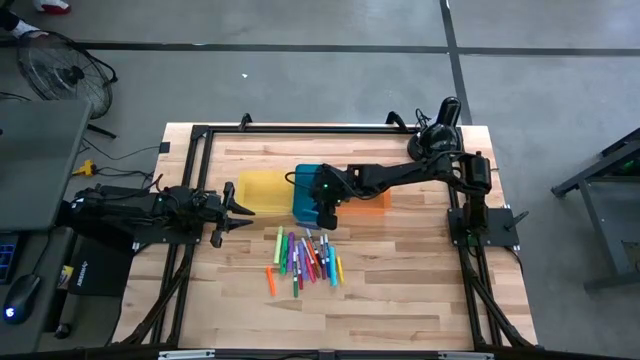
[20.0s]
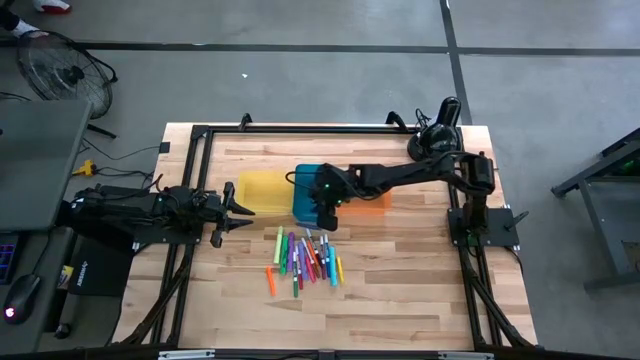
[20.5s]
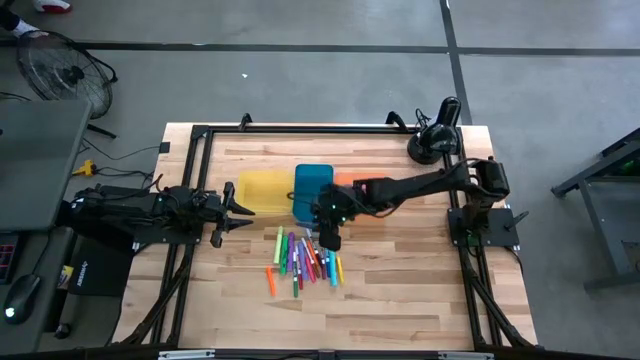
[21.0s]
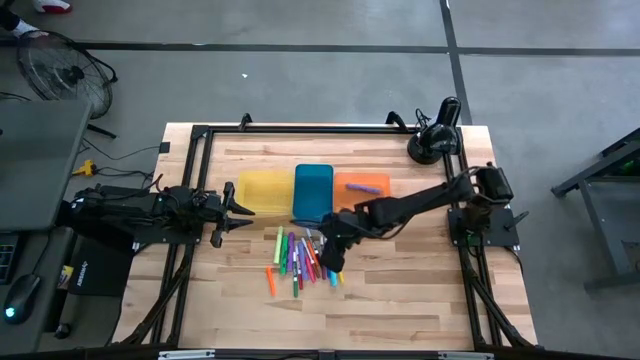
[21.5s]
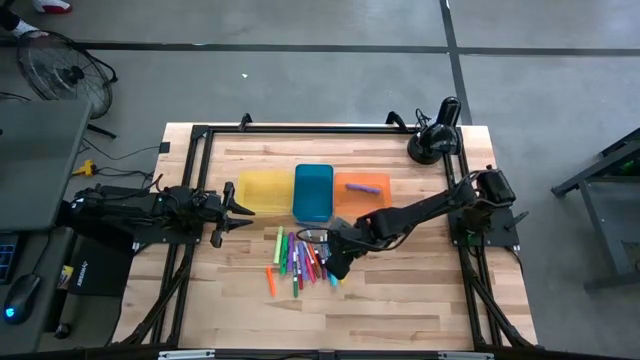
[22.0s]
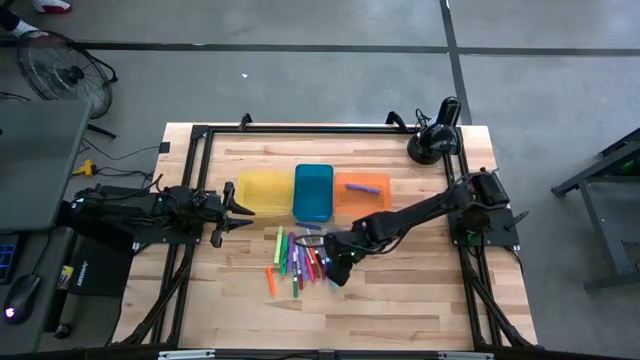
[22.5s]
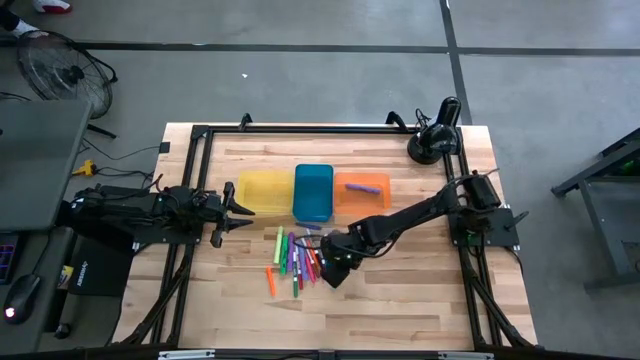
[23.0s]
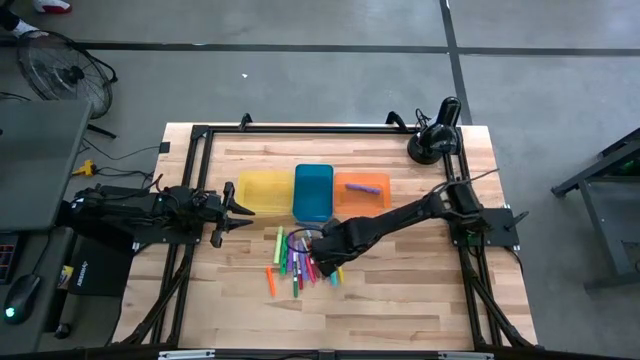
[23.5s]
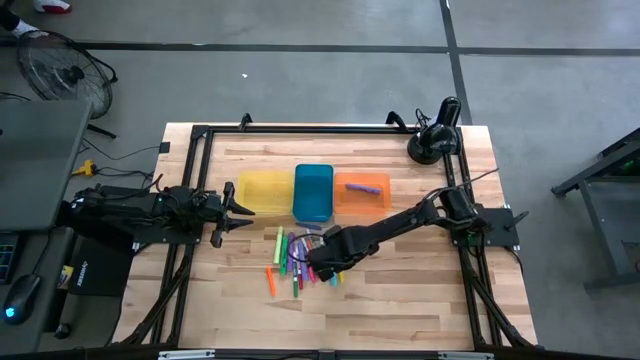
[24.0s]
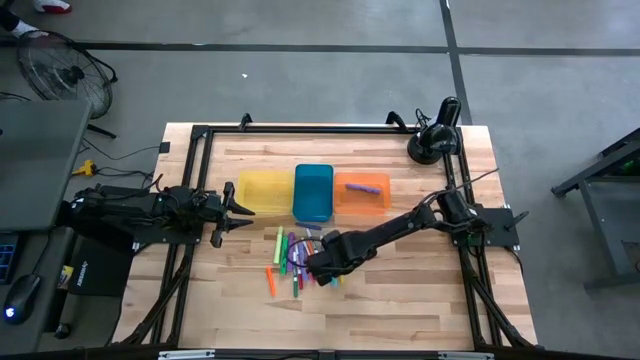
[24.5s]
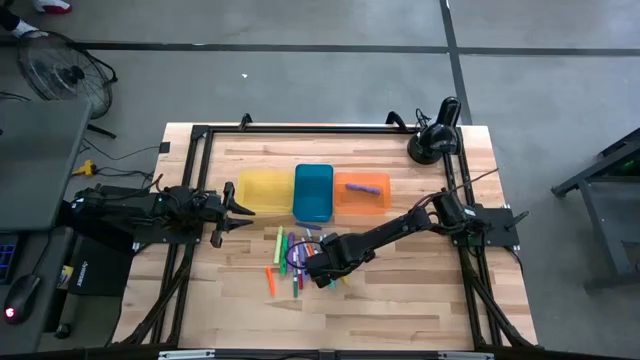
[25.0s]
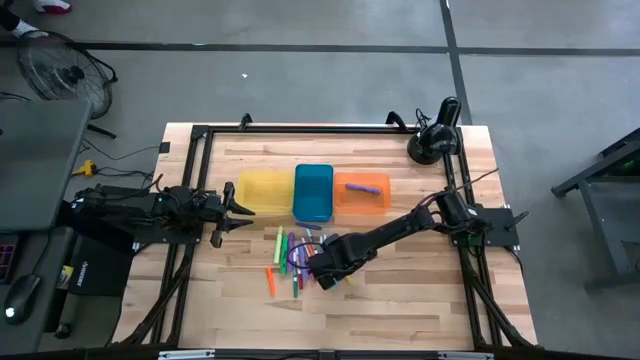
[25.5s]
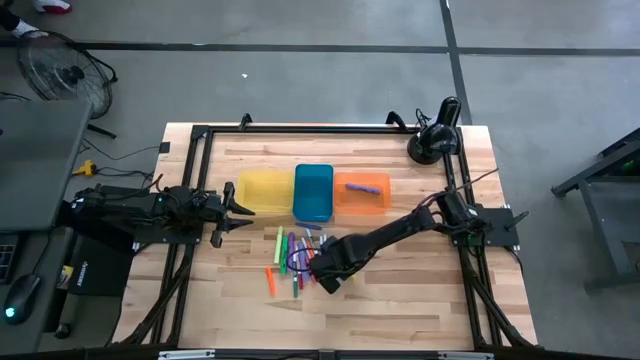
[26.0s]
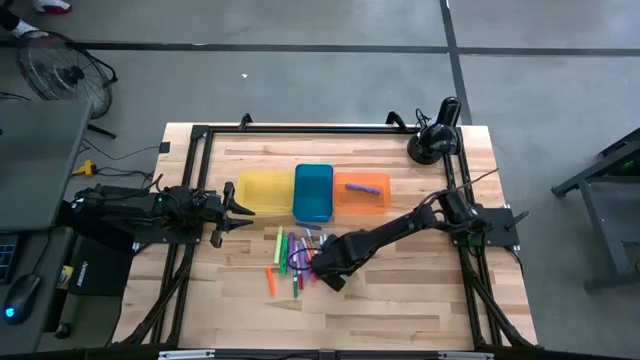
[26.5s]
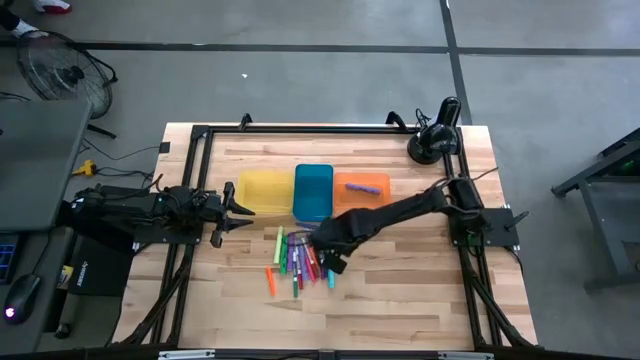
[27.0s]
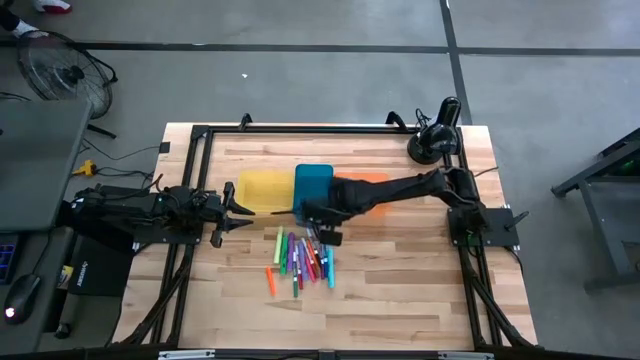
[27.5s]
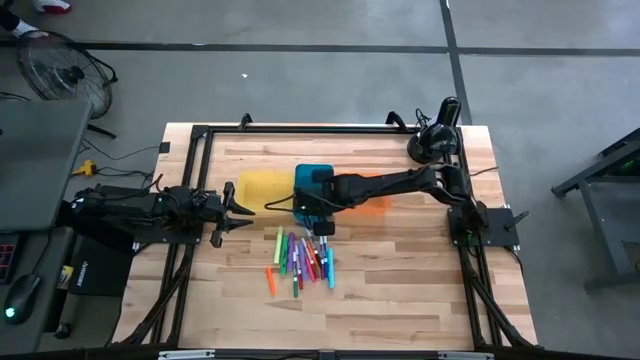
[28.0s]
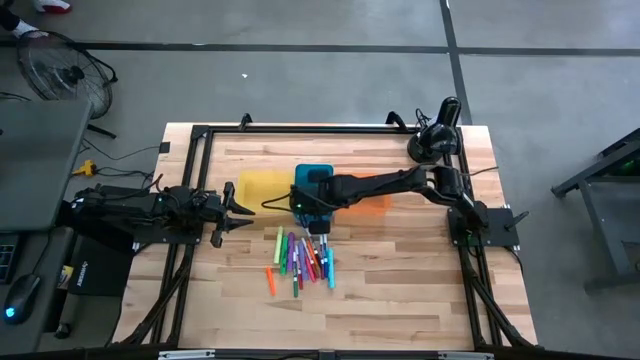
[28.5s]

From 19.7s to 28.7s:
Task: Pick & Place Markers
Put the yellow pen into the blue bin

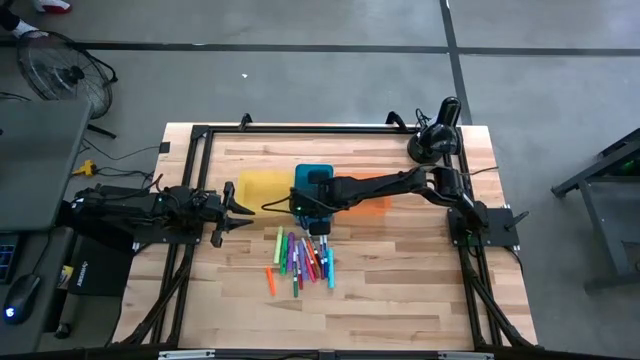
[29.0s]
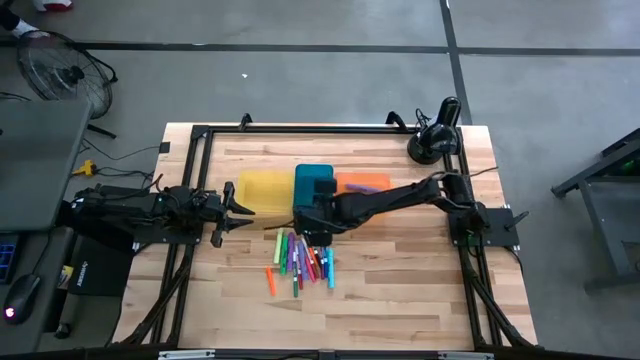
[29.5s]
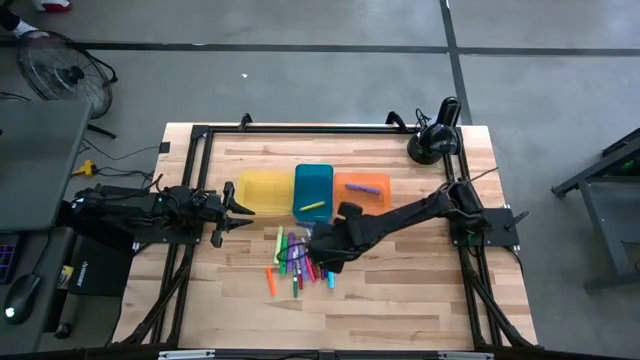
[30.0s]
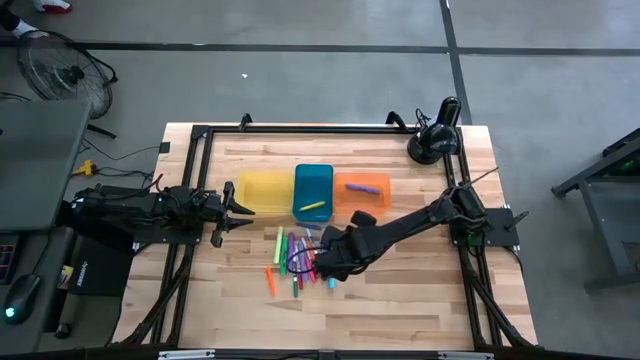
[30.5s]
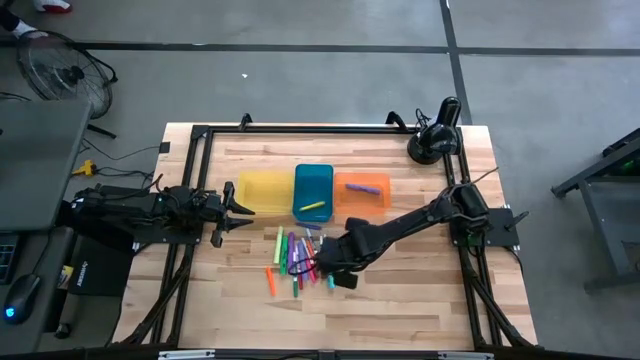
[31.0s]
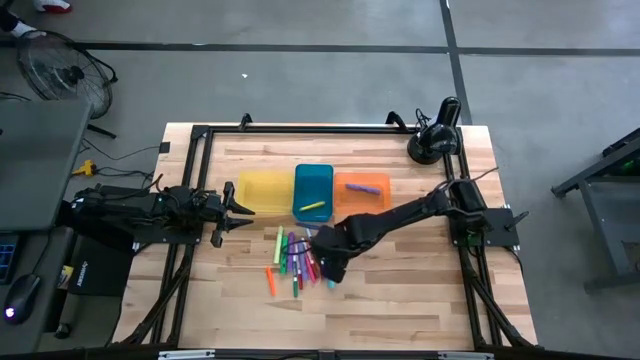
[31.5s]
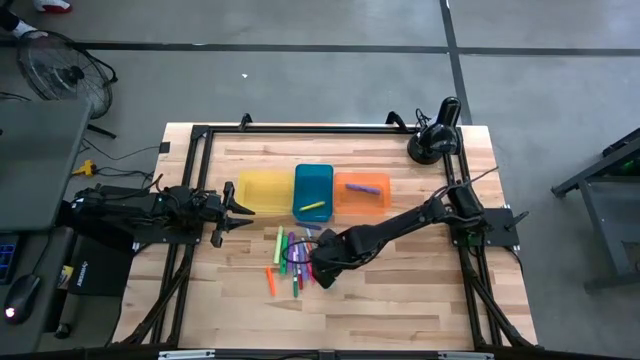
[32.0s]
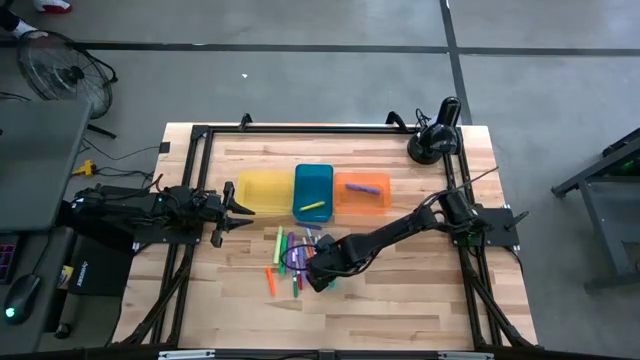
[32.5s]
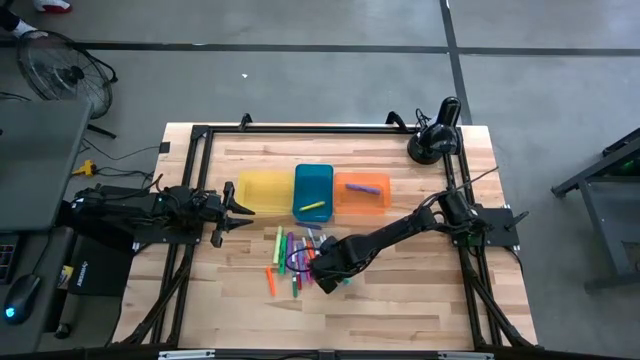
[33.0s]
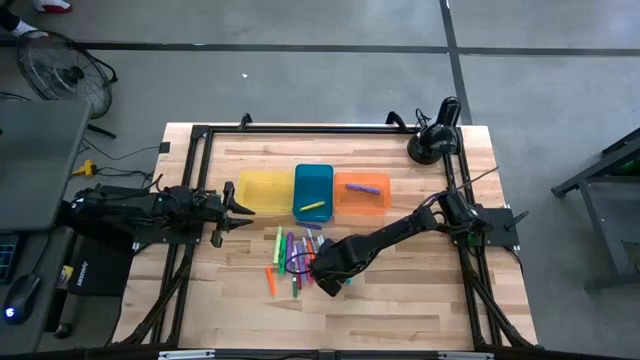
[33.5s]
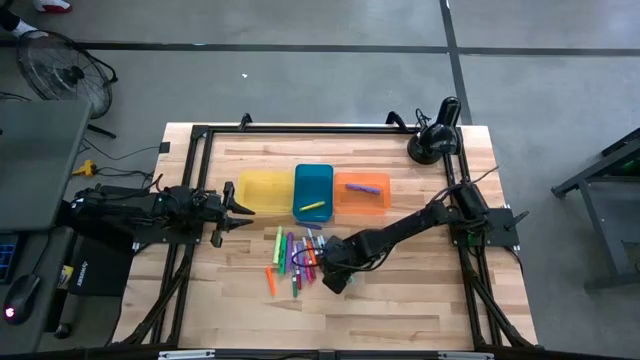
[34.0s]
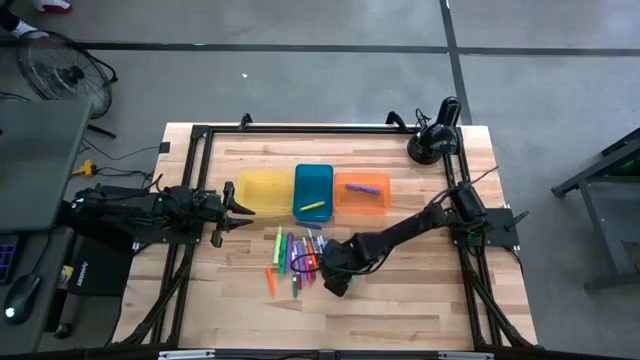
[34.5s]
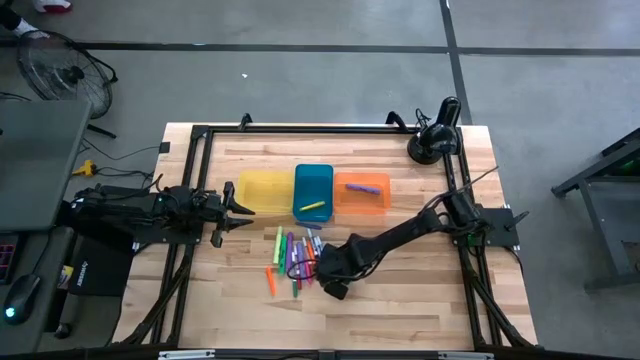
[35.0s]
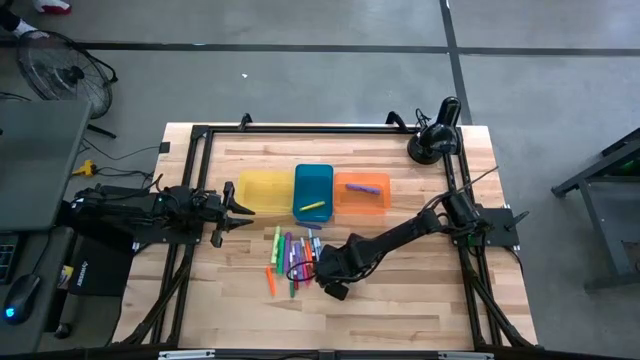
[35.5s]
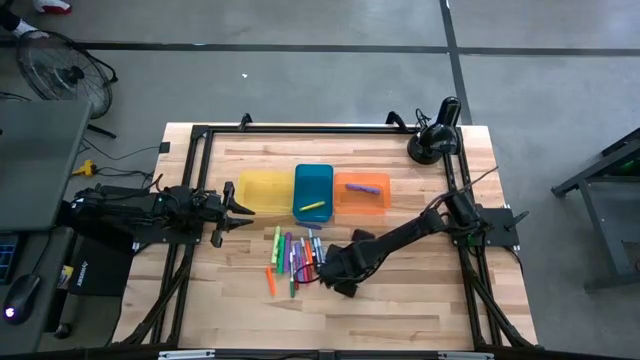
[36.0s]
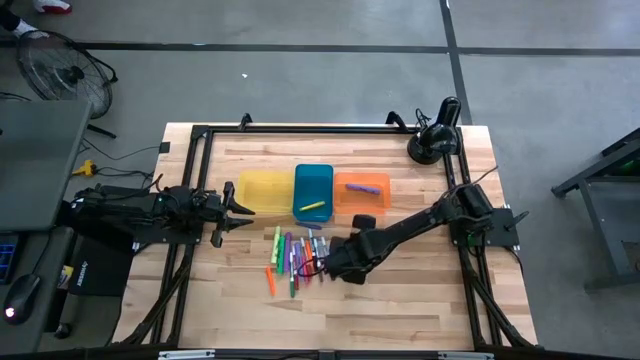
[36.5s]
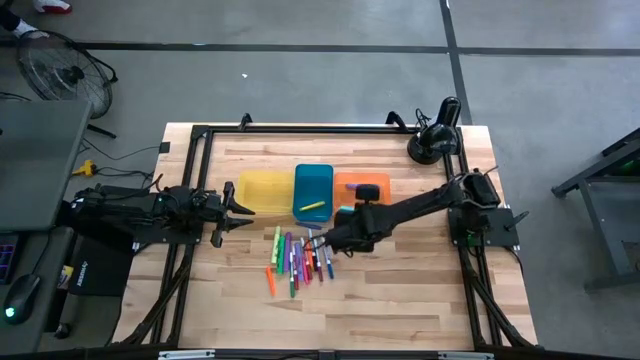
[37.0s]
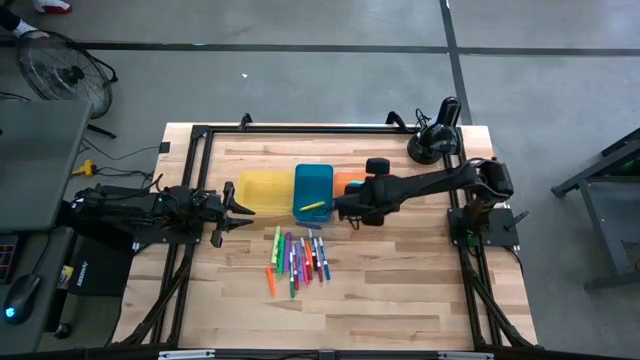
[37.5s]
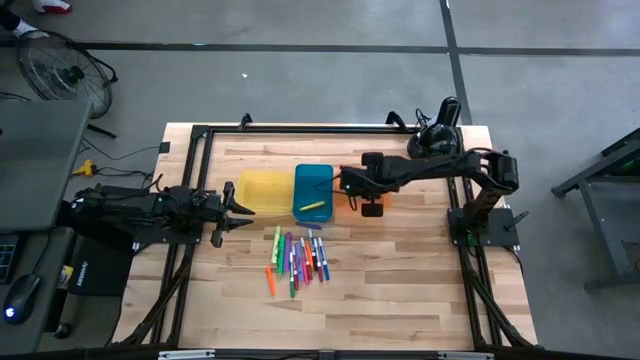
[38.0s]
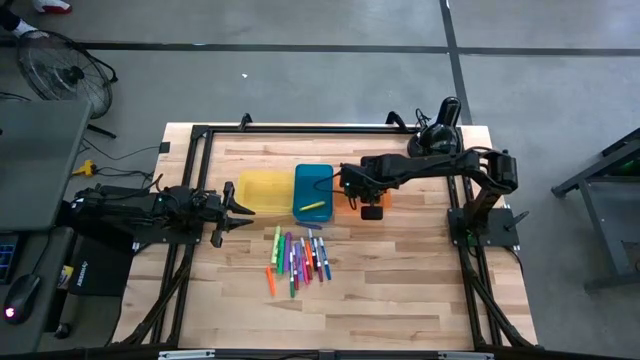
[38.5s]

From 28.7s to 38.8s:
Put the light blue highlighter pen into the orange bin

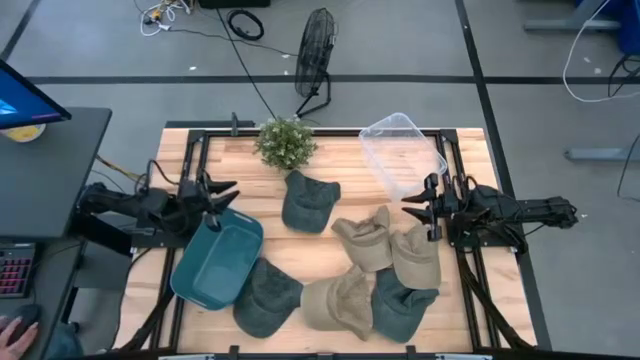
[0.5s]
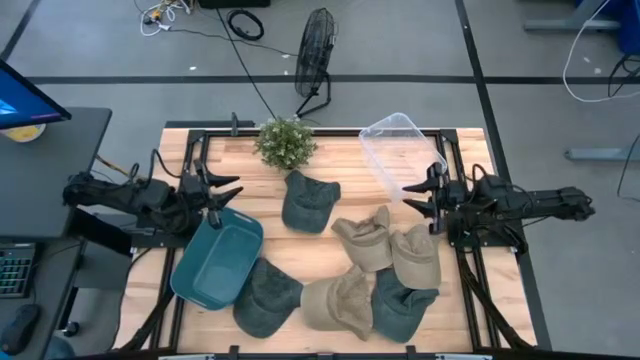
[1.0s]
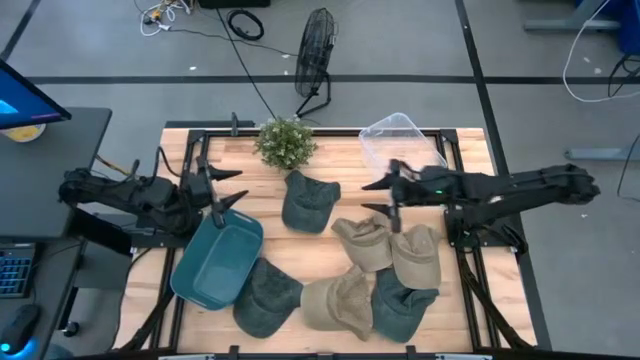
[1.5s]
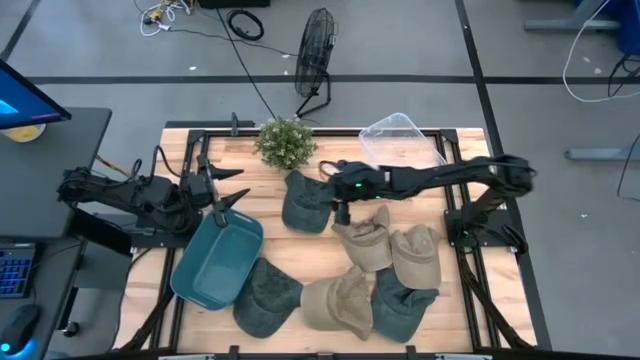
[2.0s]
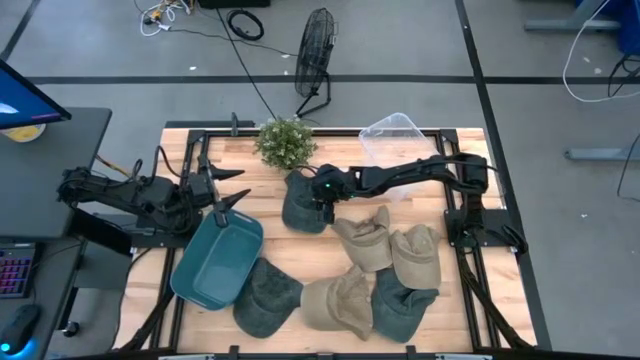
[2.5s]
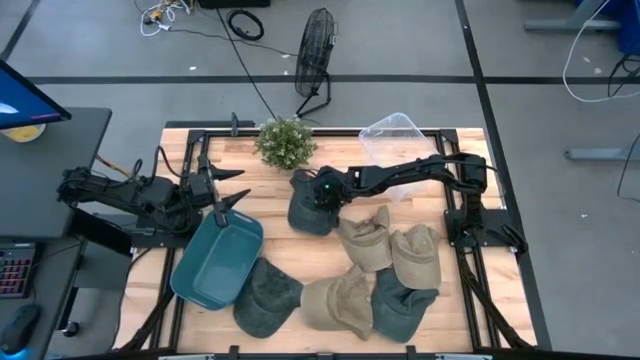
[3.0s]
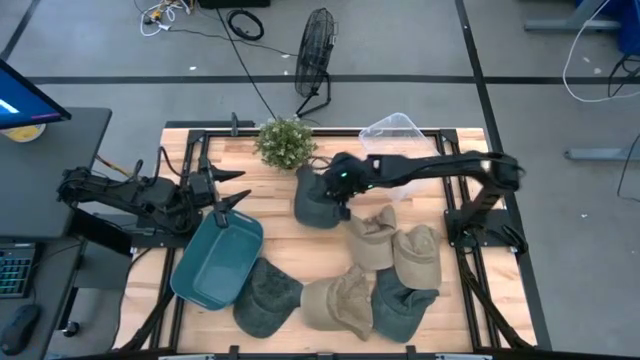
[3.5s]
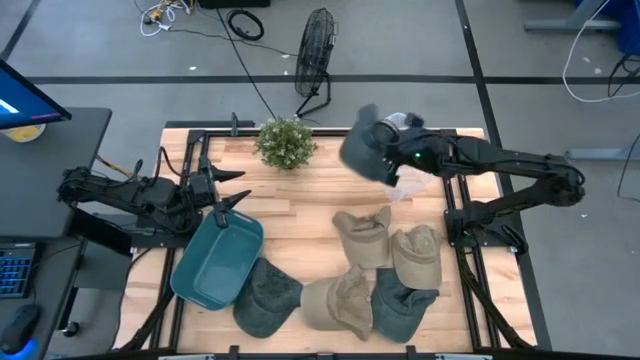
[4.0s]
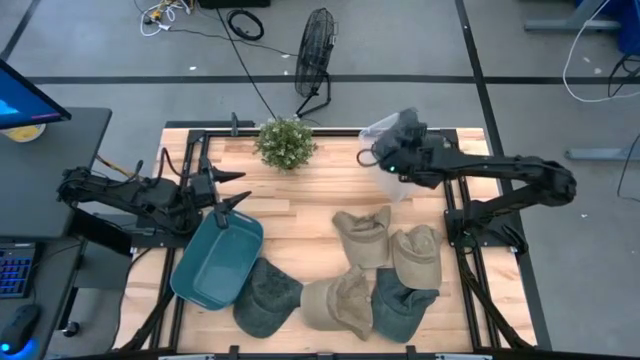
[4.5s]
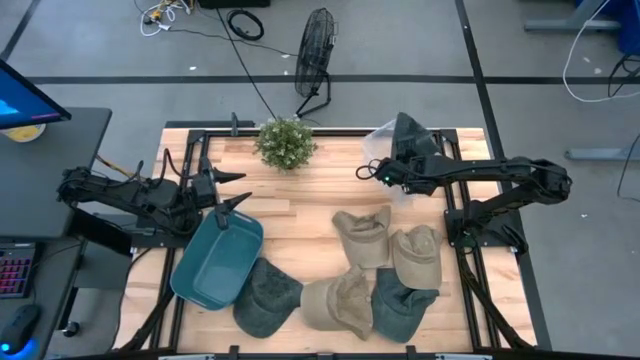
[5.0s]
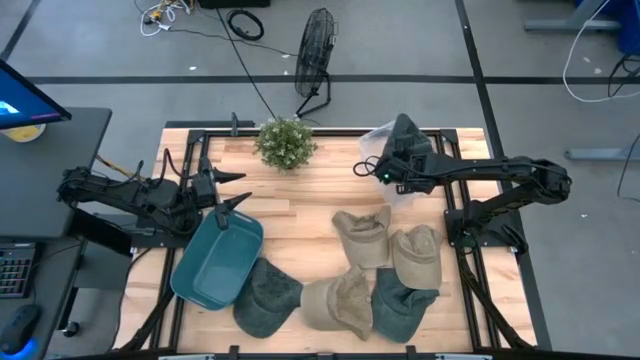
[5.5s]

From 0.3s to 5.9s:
Task: Pick & Place hat
Put the top black cap into the transparent bin
